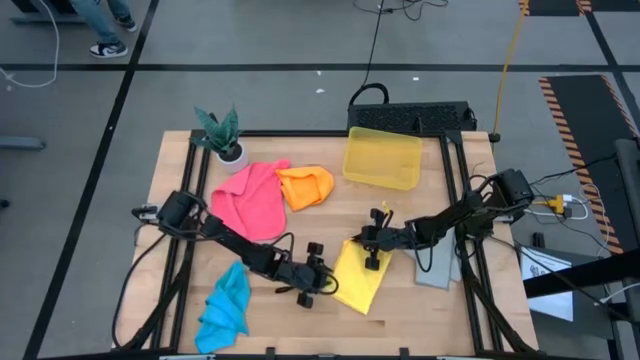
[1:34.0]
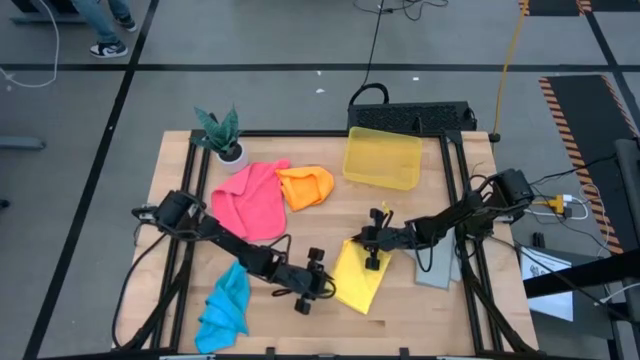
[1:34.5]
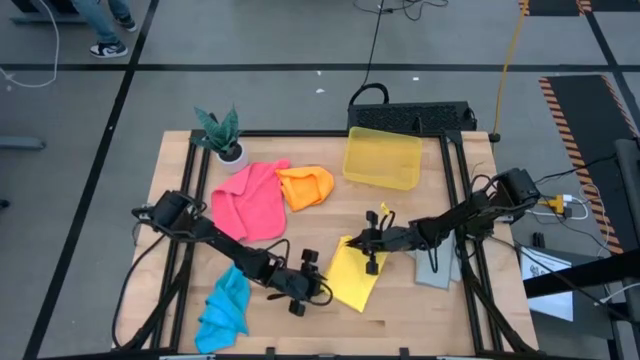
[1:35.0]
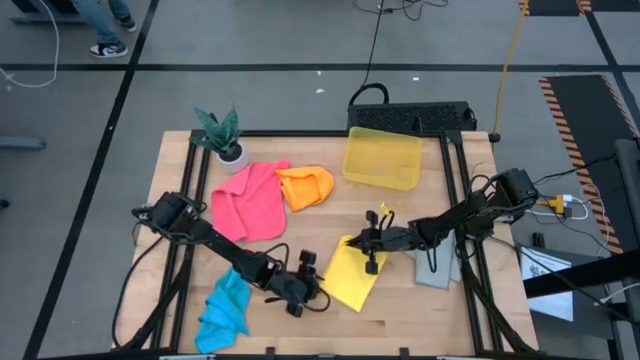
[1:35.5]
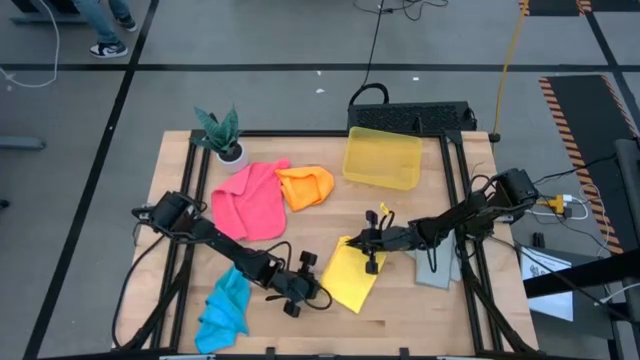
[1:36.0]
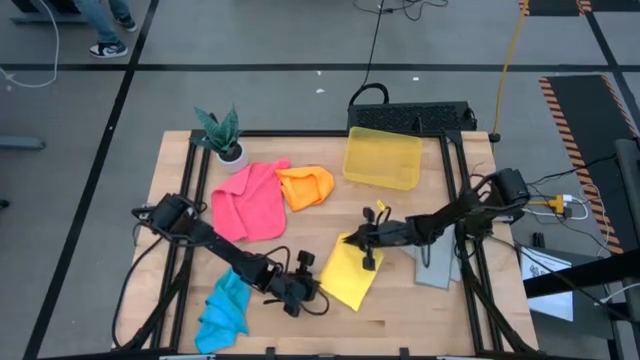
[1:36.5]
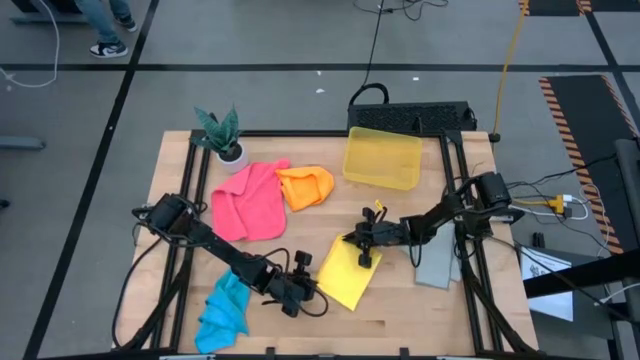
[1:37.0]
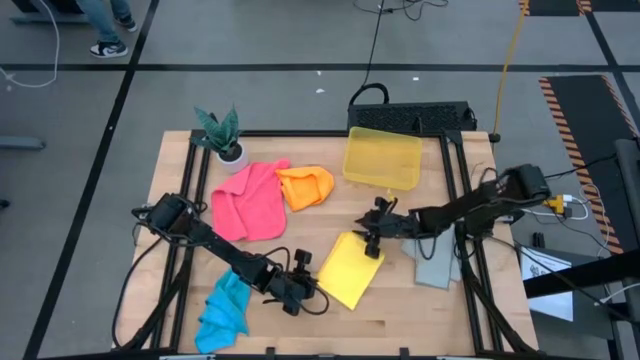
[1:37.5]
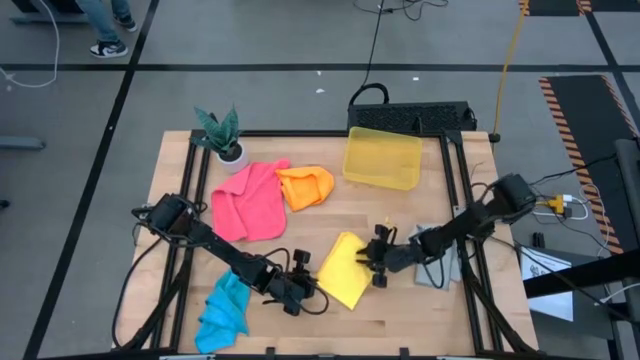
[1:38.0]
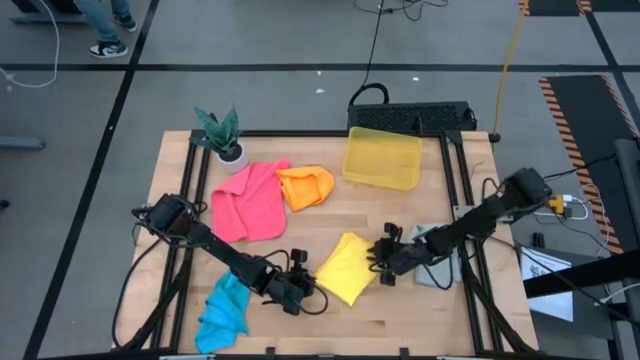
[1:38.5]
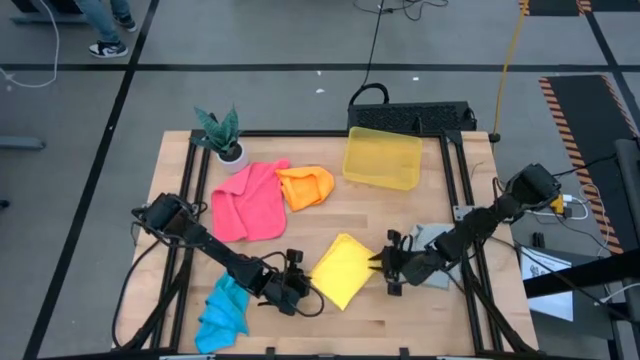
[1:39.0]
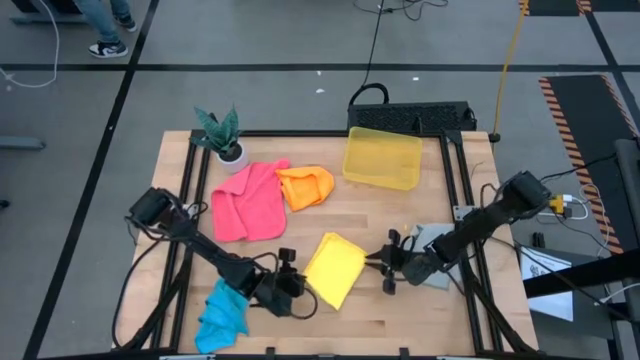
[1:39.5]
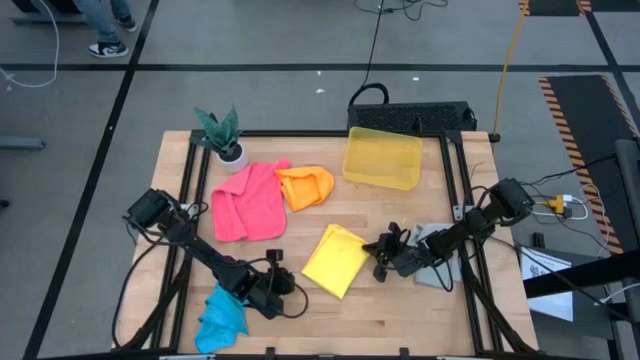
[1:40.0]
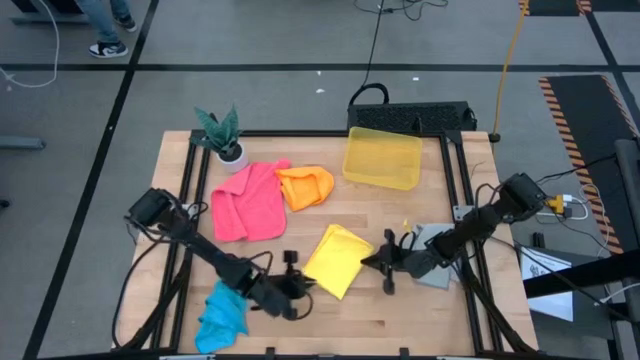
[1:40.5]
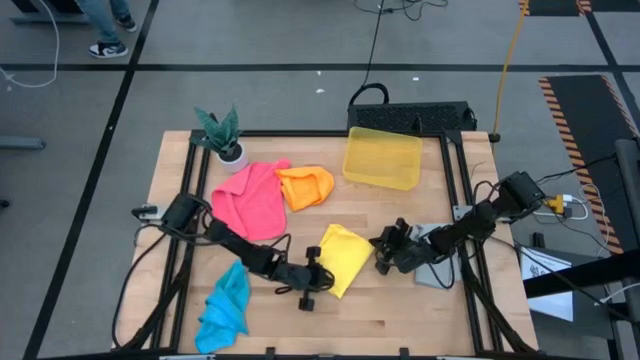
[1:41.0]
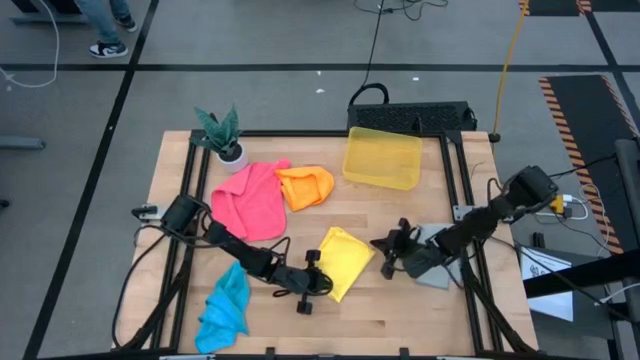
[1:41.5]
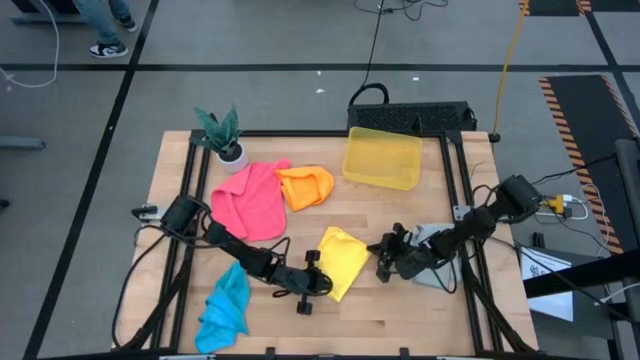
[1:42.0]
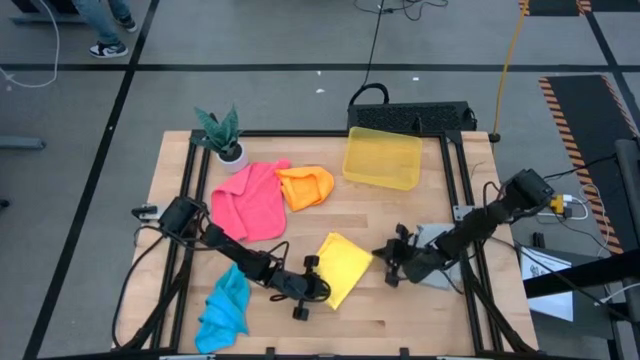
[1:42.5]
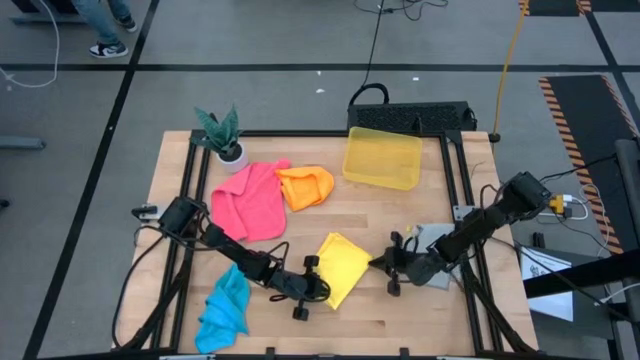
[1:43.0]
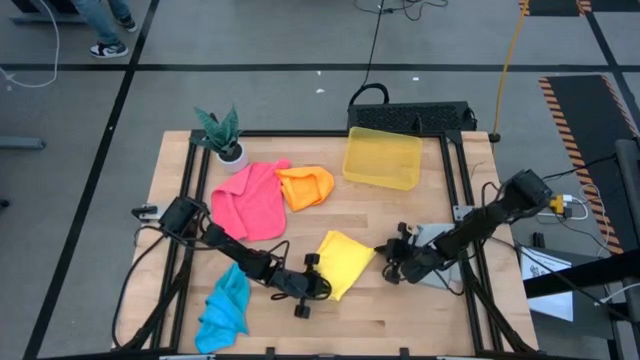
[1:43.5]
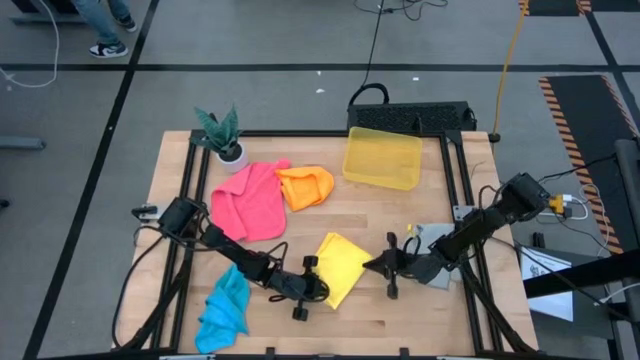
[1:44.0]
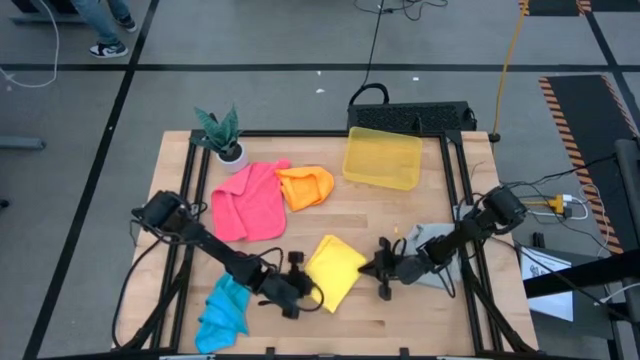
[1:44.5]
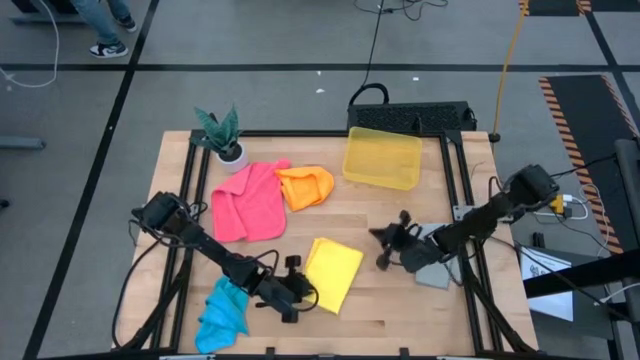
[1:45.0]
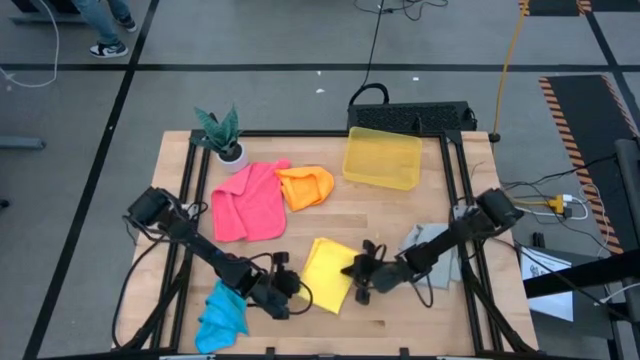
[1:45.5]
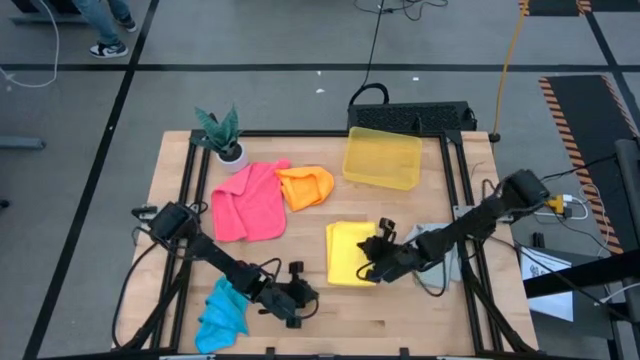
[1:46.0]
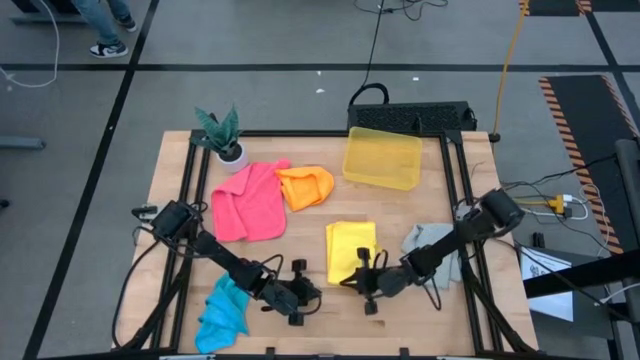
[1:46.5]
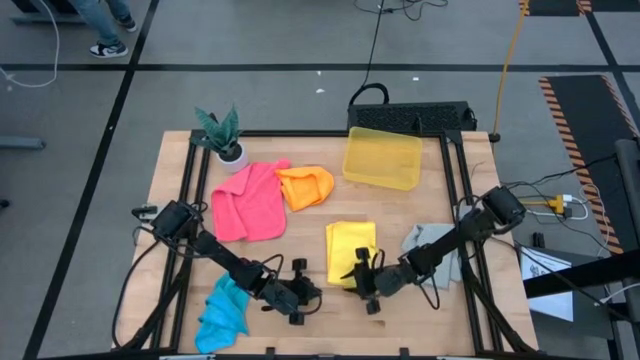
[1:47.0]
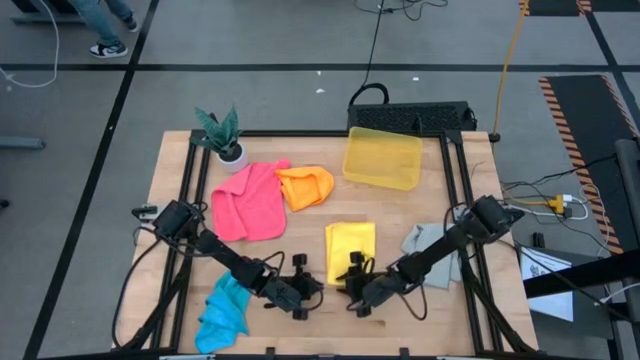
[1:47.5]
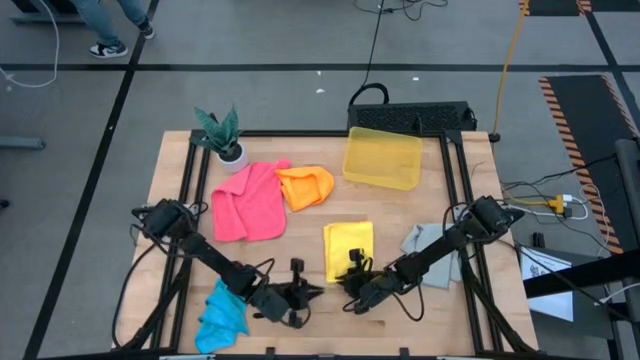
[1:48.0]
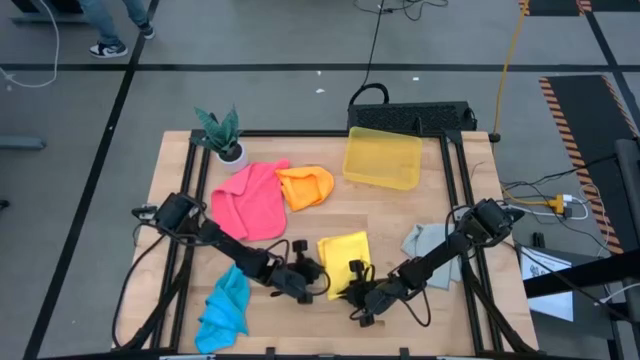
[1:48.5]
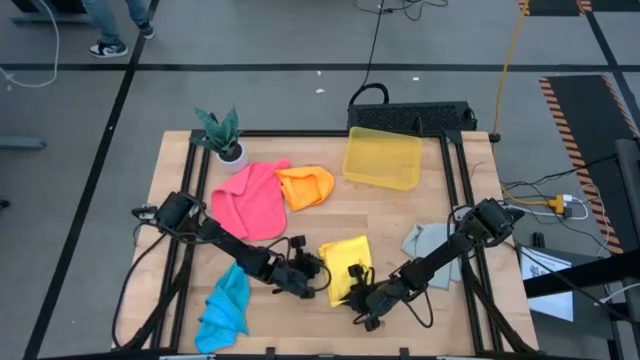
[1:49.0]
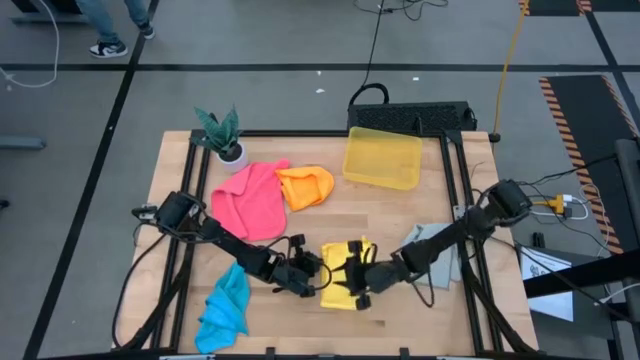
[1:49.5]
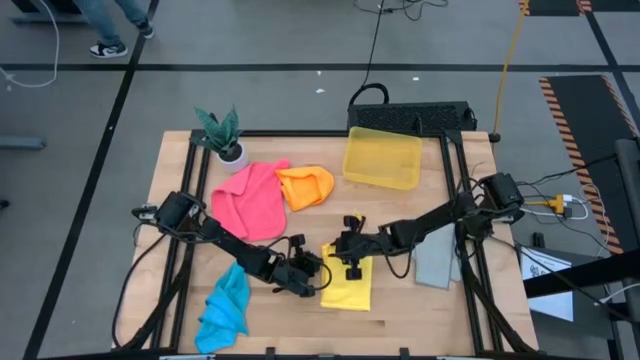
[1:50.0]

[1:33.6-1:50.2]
Task: Fold microfiber towels
Fold the yellow kitchen towel

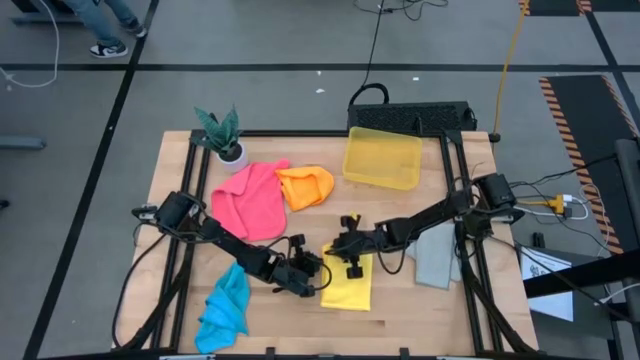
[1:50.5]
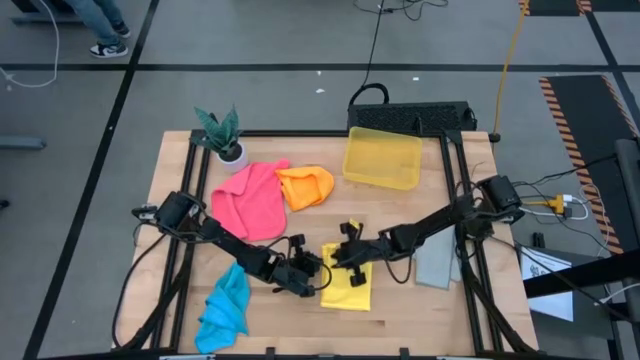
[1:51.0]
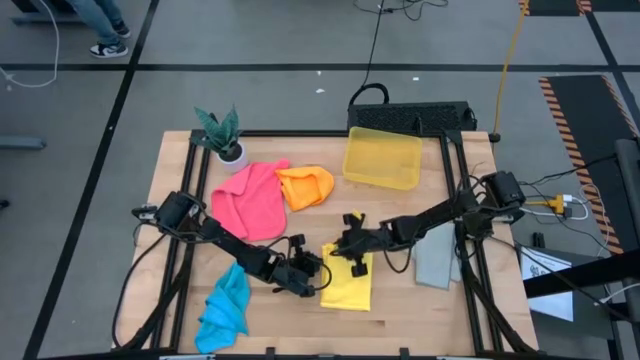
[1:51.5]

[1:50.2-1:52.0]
Fold the yellow kitchen towel

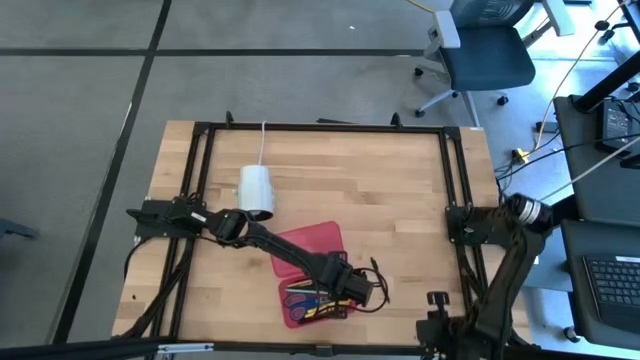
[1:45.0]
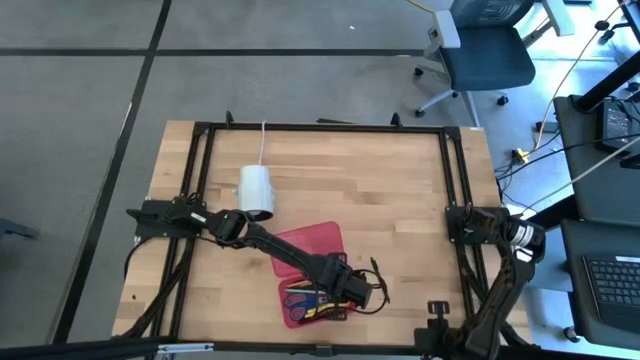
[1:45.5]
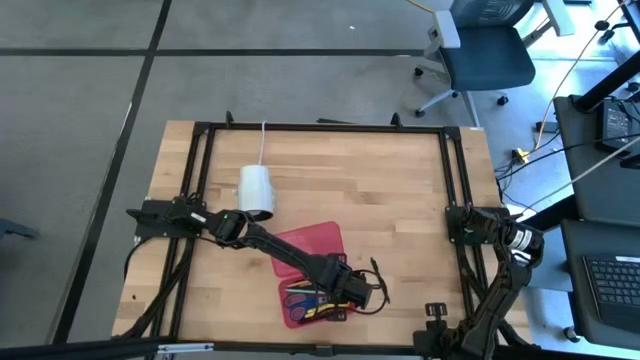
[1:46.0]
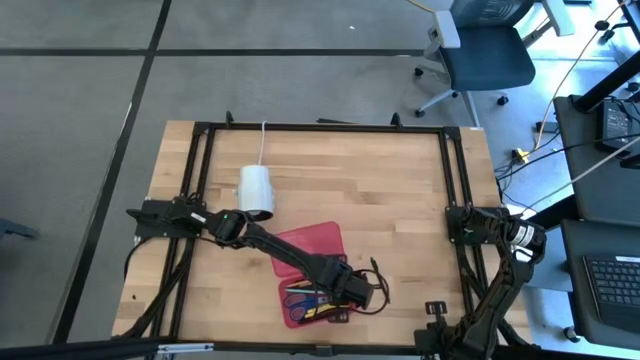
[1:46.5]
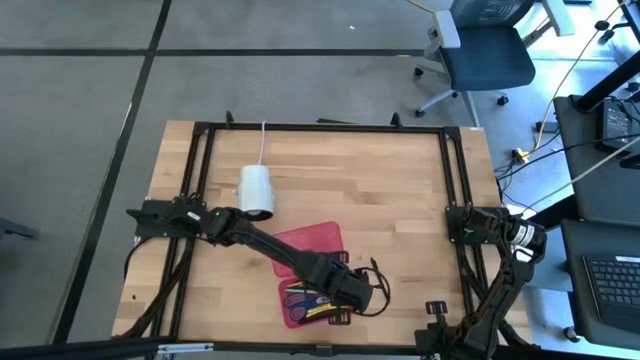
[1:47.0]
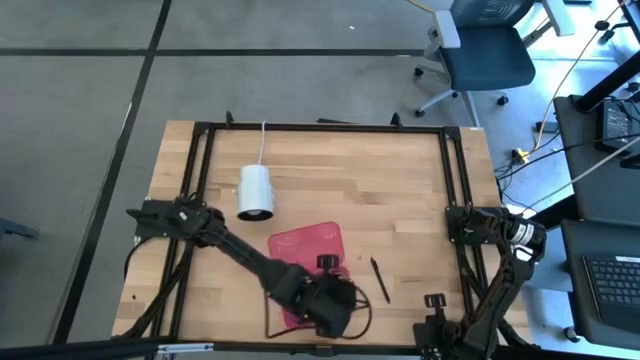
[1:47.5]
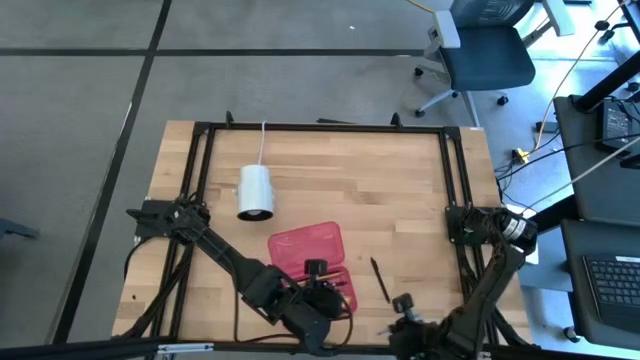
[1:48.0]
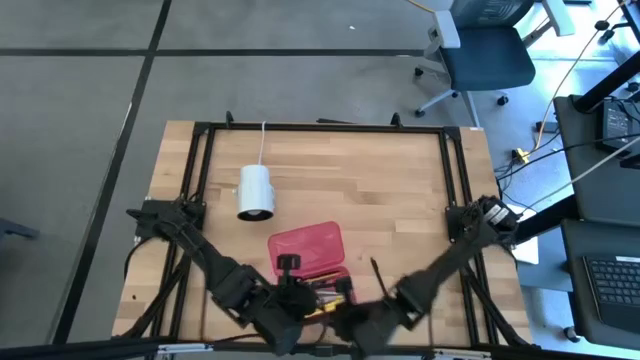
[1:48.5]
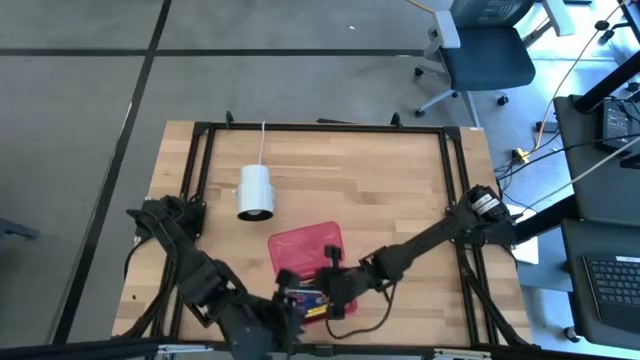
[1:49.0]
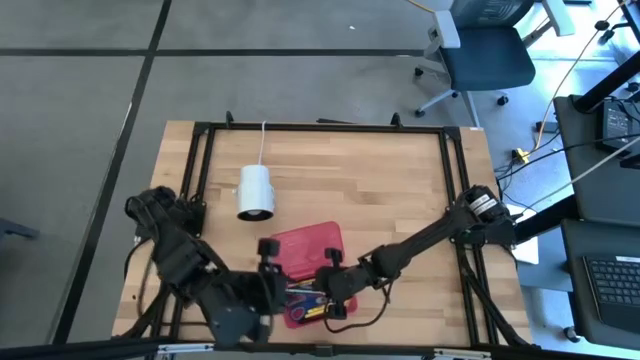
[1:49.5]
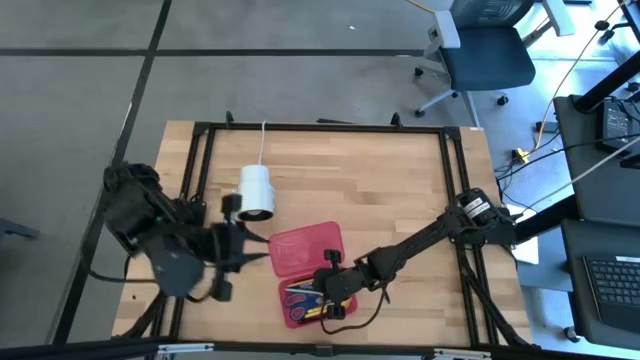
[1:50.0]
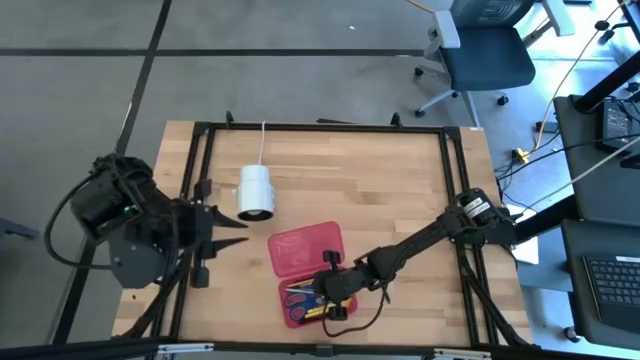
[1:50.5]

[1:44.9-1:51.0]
Task: Pick & place school supplies into a supply box
Put the blue pen into the pink supply box
